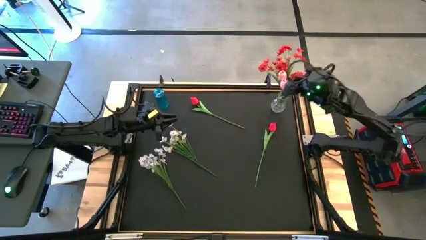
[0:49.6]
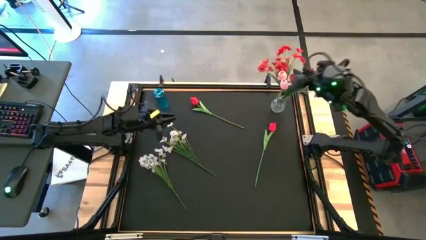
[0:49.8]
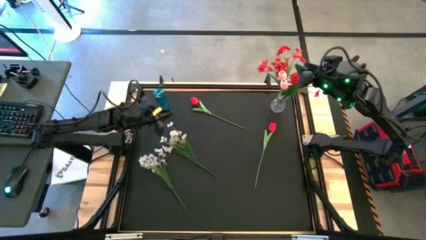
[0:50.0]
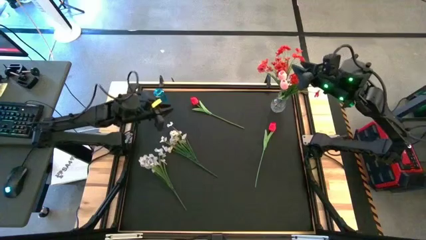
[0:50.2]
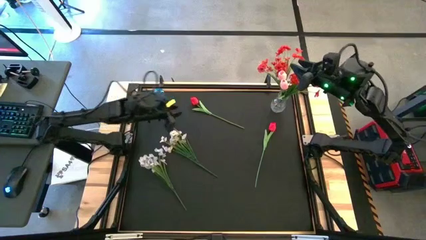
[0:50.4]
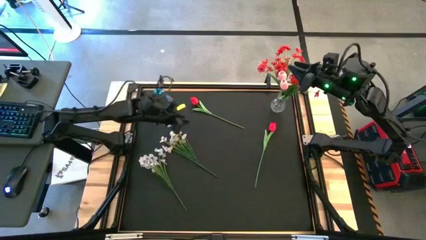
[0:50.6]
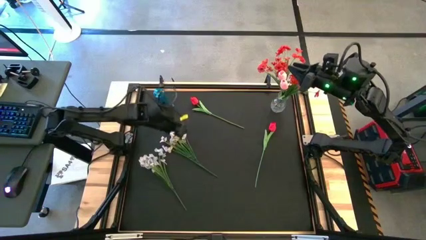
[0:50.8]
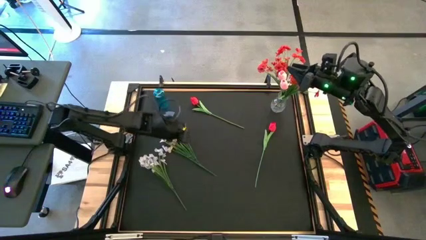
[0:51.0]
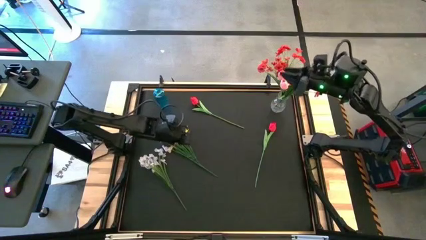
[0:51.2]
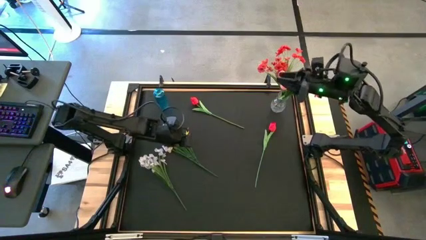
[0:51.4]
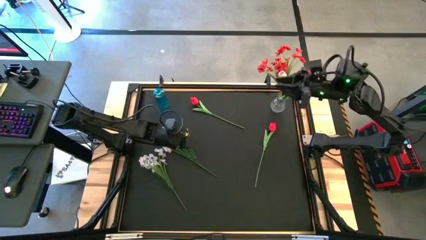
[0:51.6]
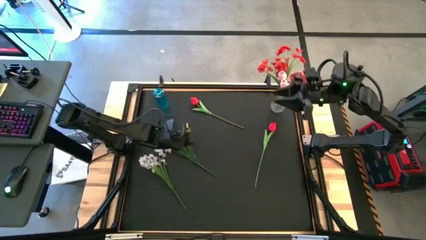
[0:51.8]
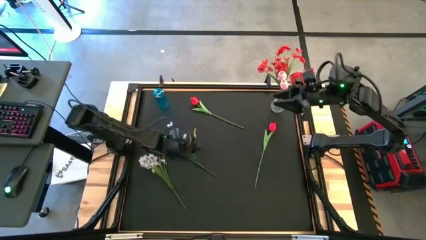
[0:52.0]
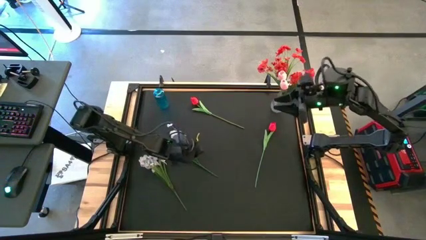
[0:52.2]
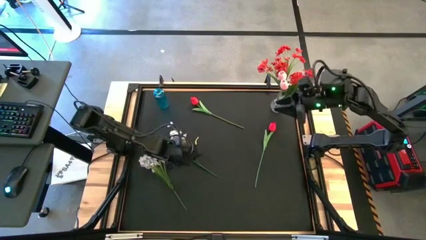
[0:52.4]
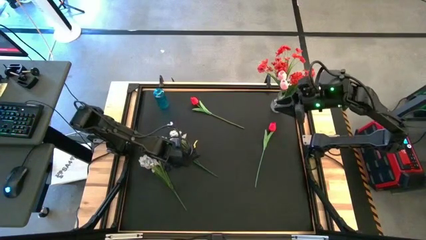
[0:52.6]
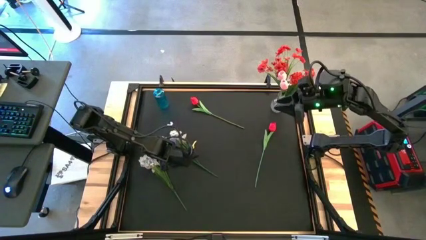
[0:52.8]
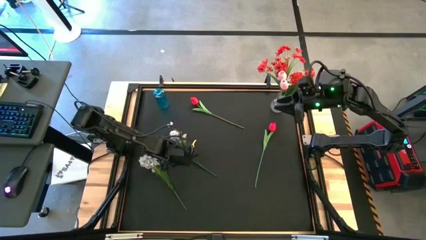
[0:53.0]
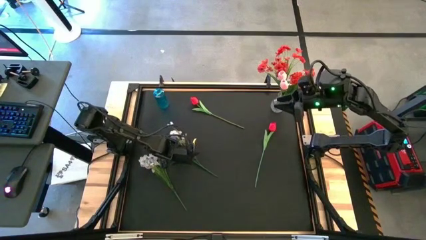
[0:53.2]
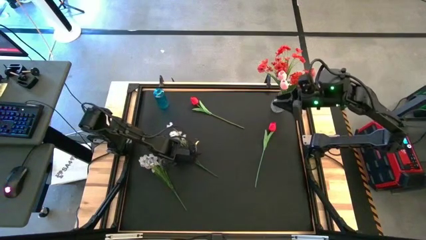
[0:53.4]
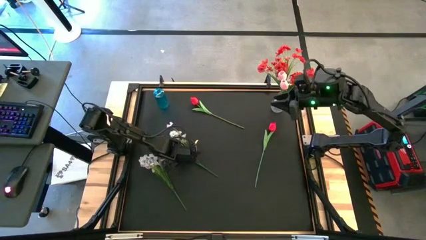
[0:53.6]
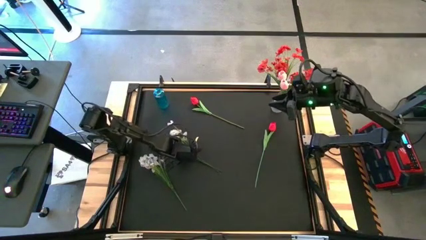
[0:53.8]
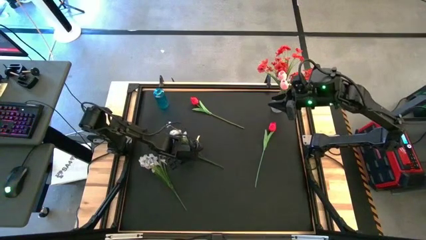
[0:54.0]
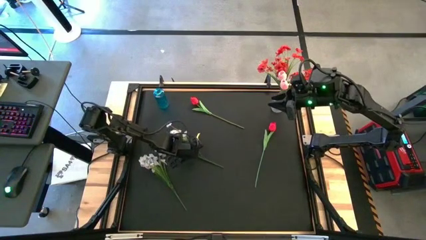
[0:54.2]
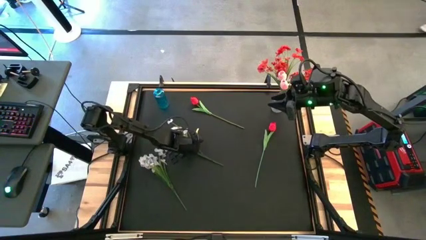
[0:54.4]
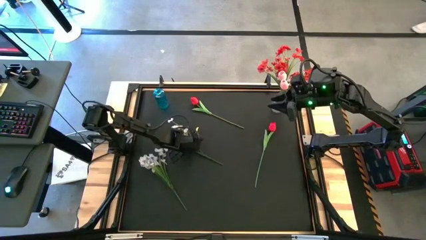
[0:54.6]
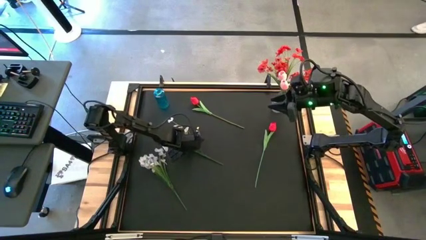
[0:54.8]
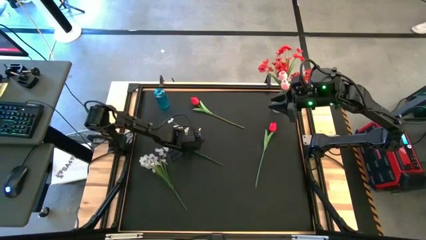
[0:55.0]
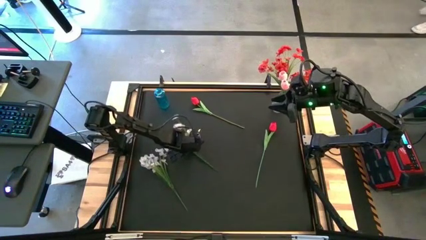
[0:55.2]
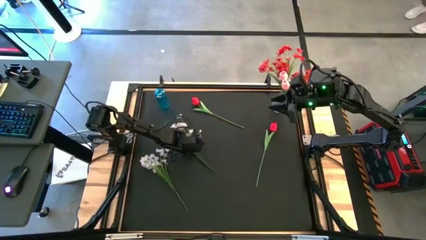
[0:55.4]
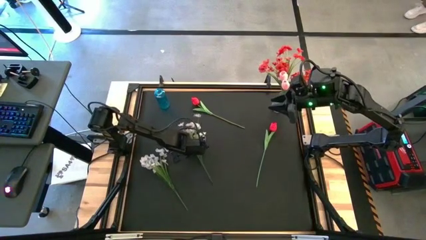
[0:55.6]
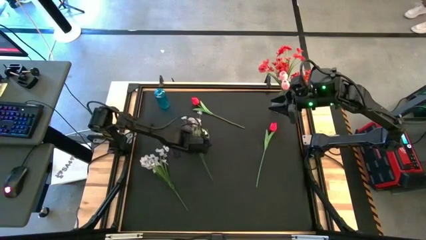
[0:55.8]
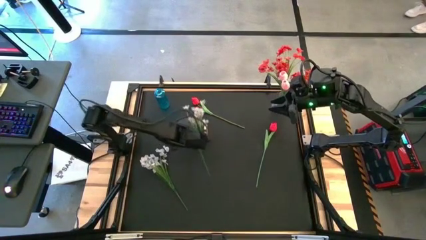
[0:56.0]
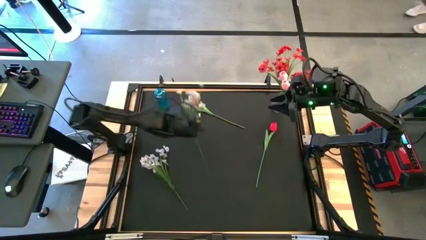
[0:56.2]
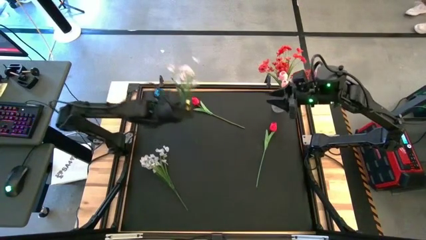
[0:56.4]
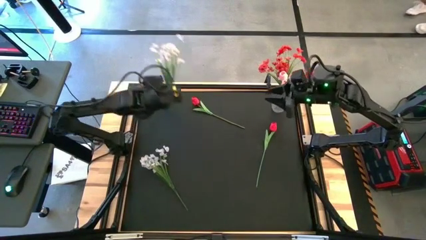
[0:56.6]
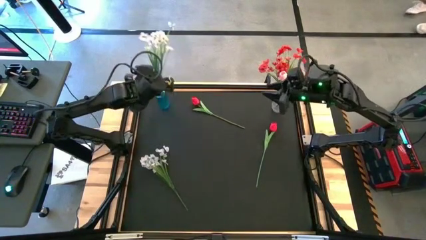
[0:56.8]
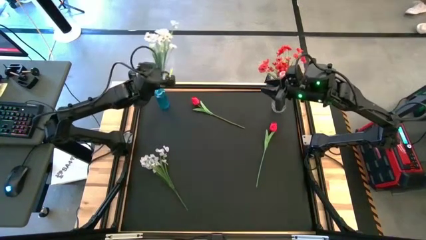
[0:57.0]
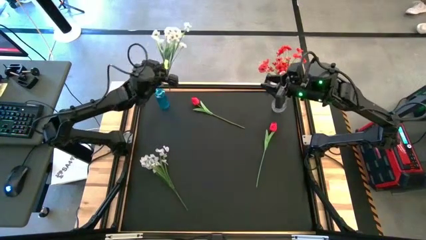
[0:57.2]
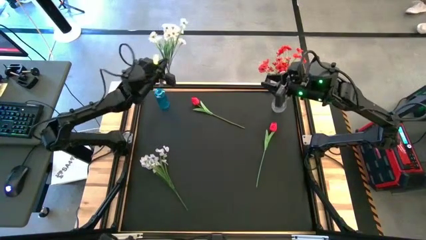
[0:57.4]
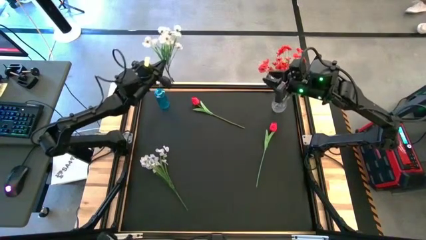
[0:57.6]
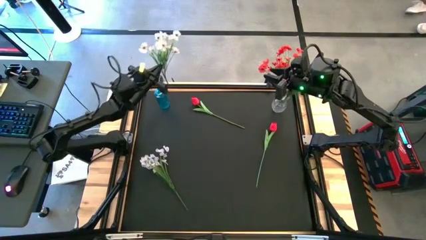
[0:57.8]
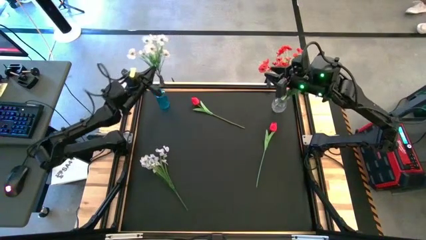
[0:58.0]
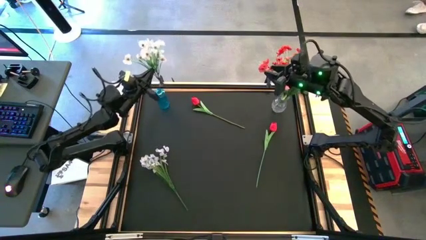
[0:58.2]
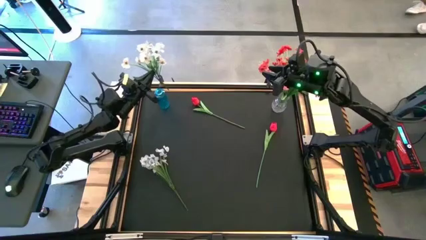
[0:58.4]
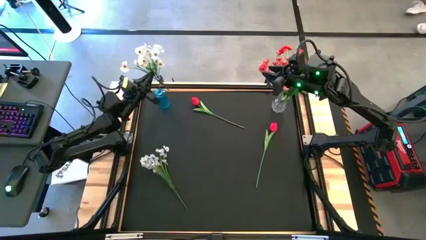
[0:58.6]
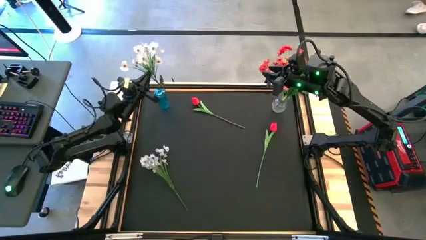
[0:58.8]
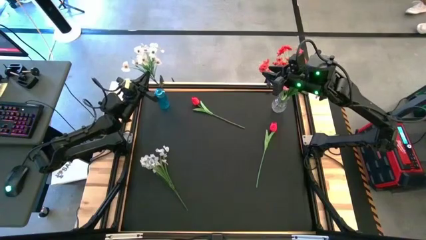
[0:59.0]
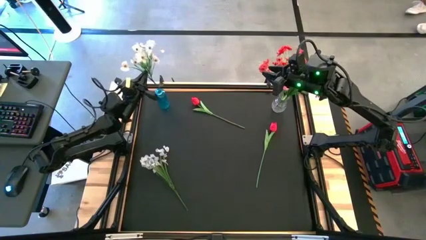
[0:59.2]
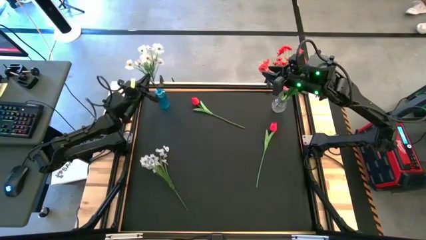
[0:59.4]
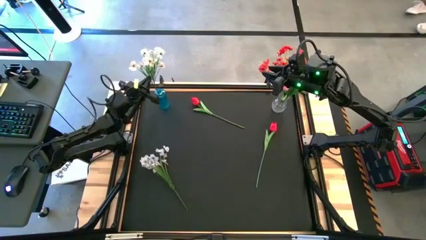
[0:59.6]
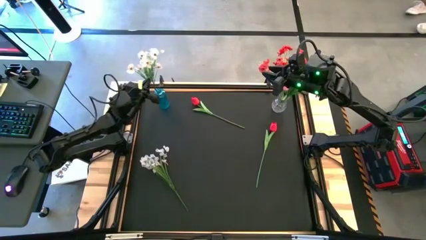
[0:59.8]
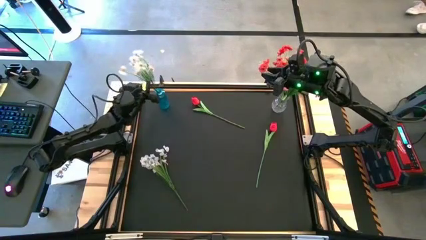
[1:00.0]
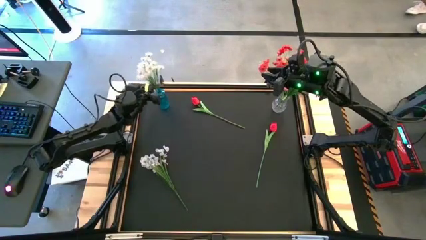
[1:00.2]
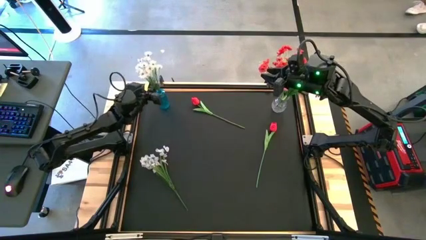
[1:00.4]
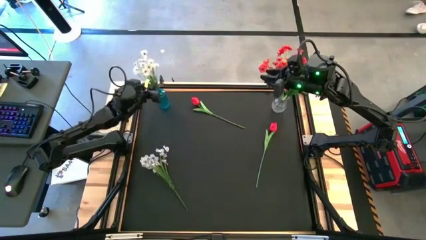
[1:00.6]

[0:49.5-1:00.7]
Task: Sort flowers into vase by color
Put the top white flowers into the blue vase

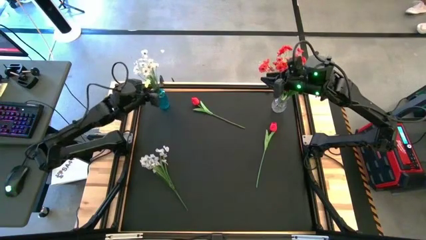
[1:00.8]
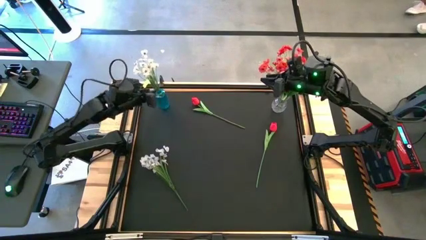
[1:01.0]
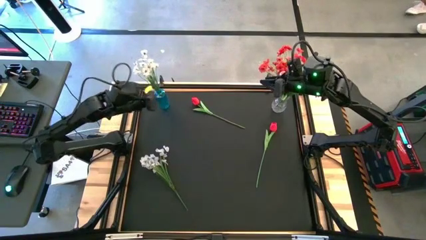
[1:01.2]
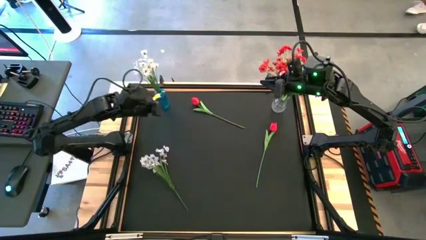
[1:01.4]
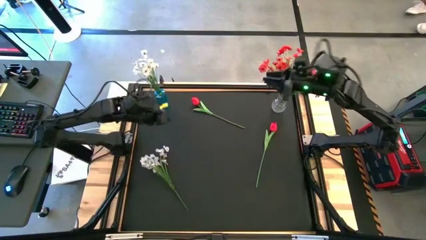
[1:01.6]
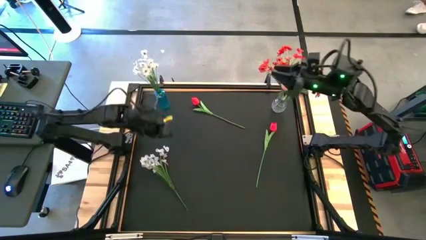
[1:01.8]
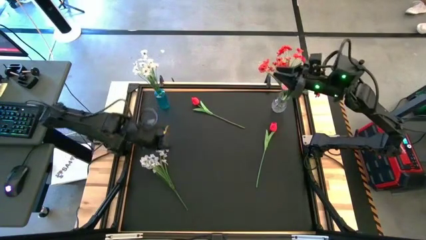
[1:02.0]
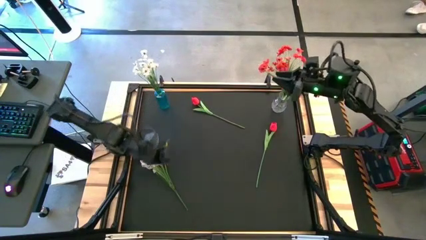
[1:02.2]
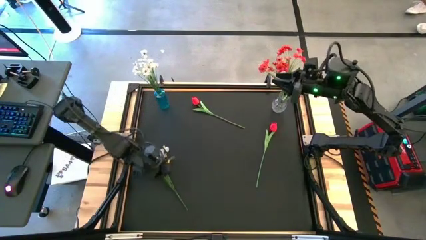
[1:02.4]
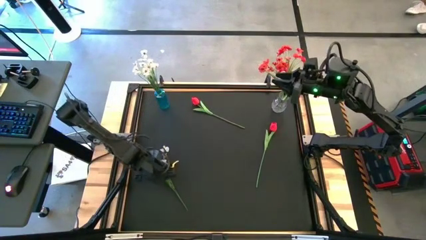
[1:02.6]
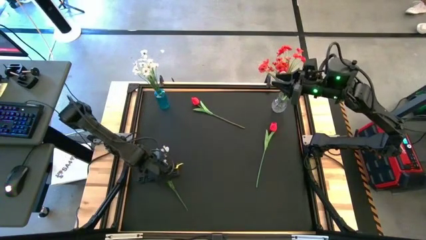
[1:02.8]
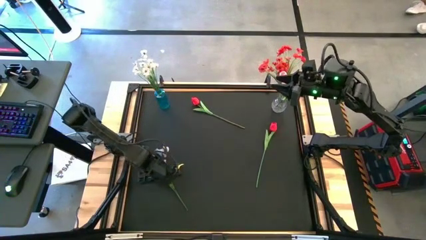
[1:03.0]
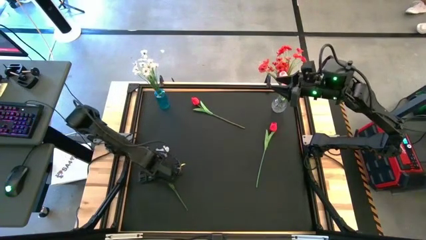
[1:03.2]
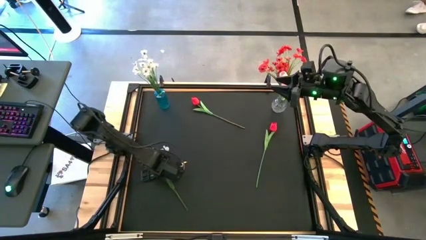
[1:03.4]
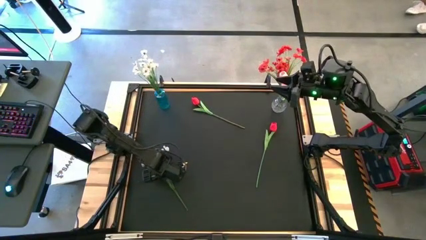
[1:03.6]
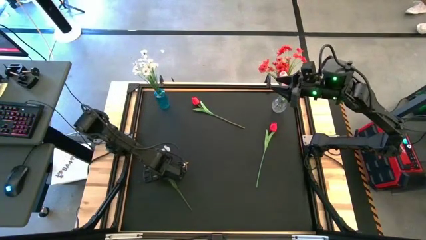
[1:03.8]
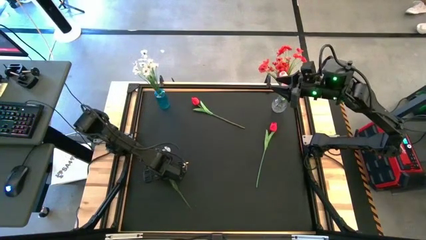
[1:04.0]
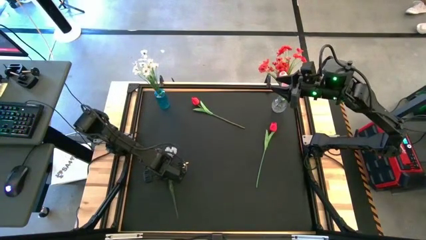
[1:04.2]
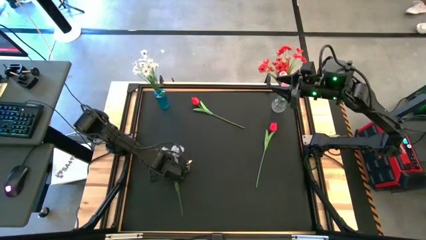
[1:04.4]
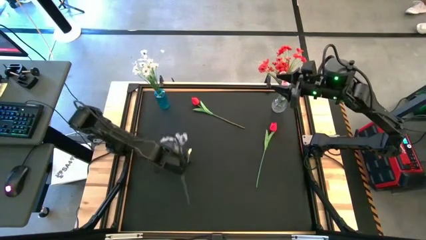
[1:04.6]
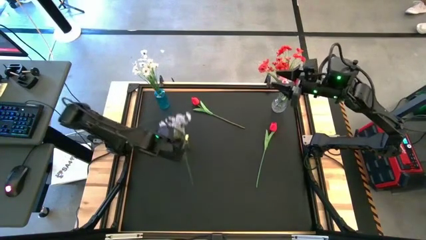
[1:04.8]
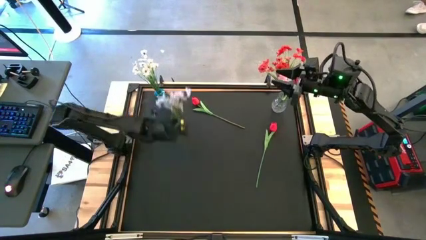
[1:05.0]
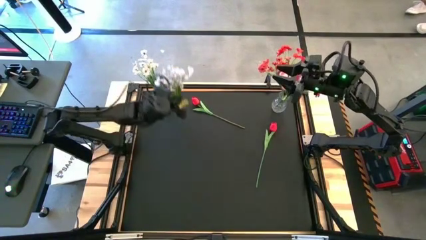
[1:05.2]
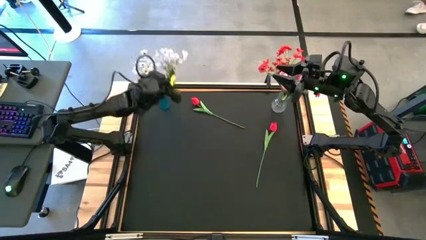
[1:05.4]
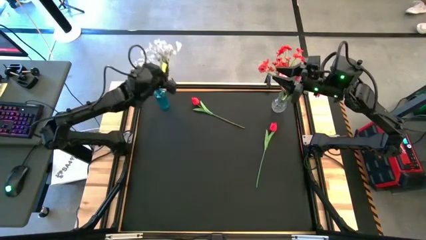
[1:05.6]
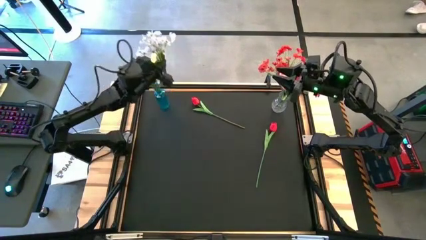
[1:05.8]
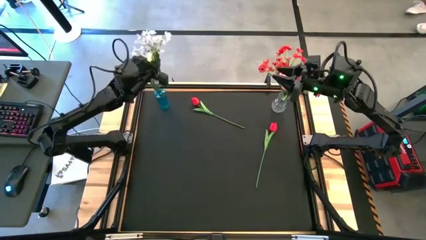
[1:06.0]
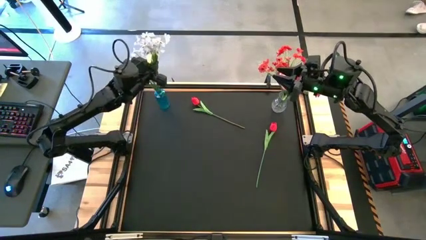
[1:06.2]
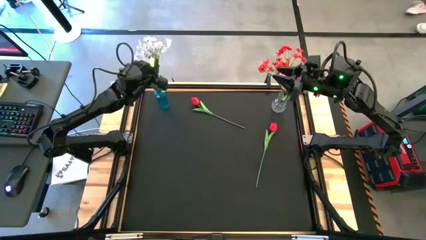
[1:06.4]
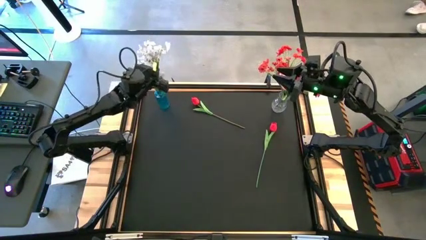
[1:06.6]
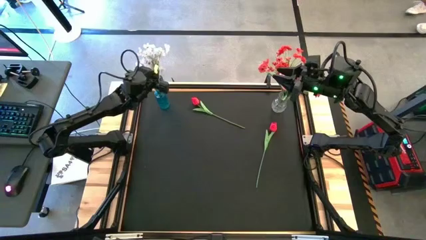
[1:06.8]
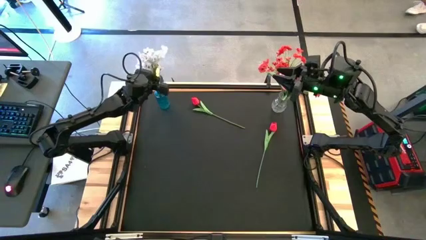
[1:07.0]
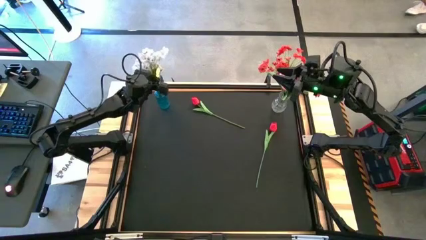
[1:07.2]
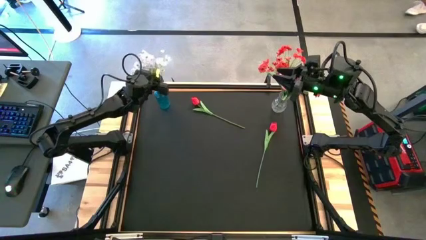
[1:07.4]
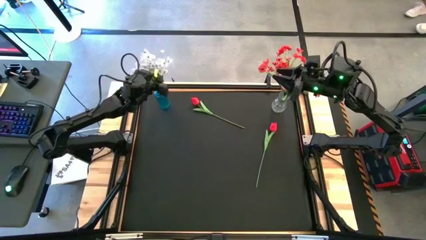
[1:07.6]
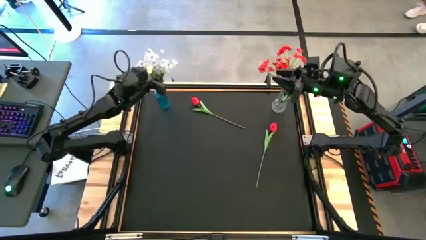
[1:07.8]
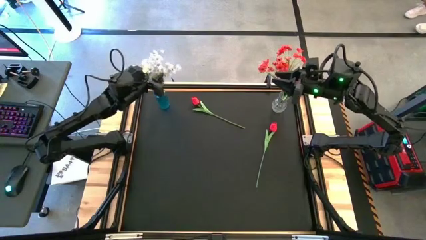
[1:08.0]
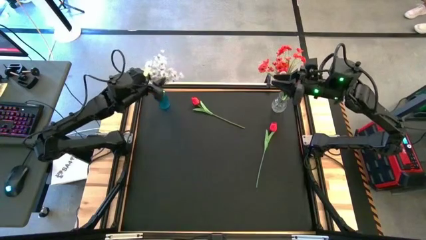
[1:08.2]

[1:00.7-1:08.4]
Put the white flowers into the blue vase
